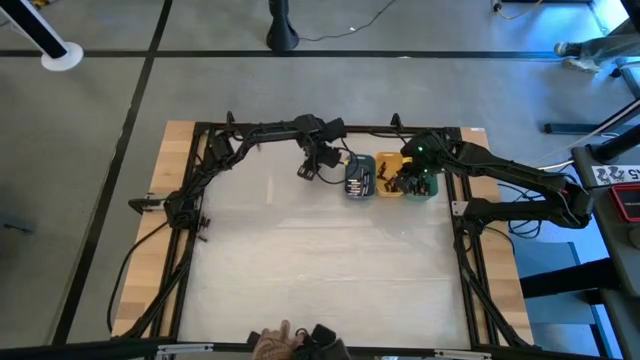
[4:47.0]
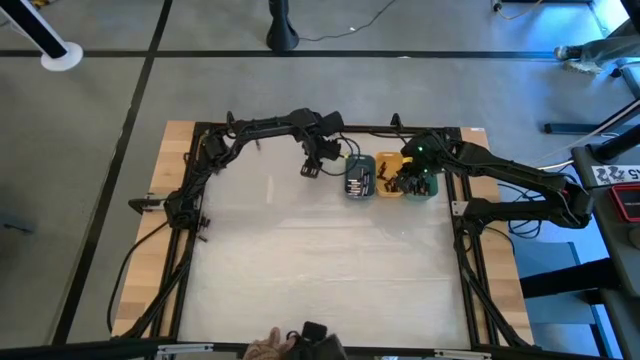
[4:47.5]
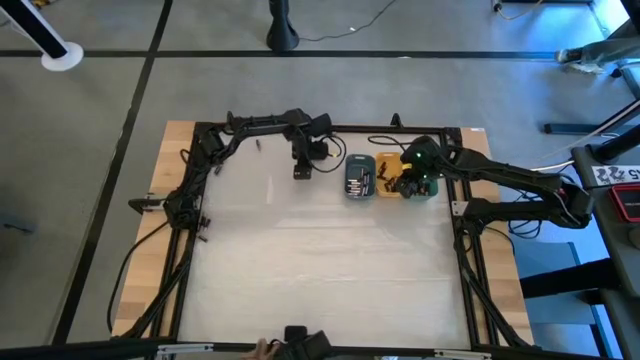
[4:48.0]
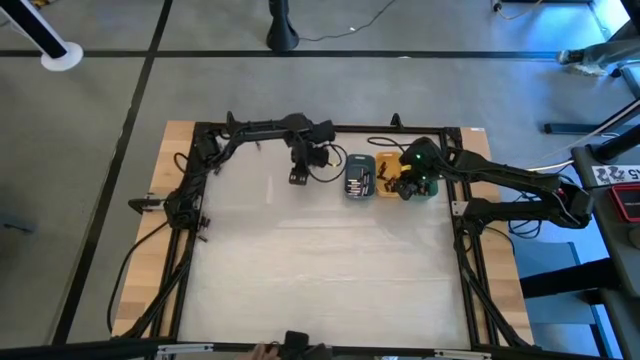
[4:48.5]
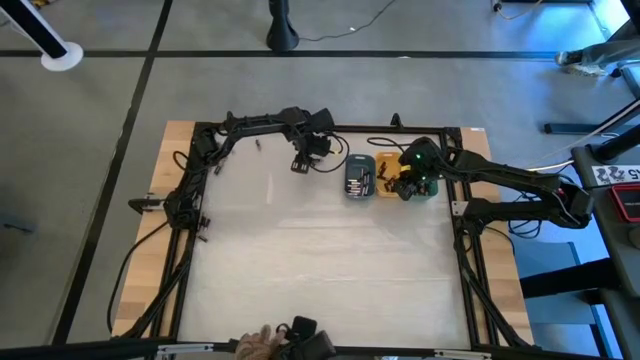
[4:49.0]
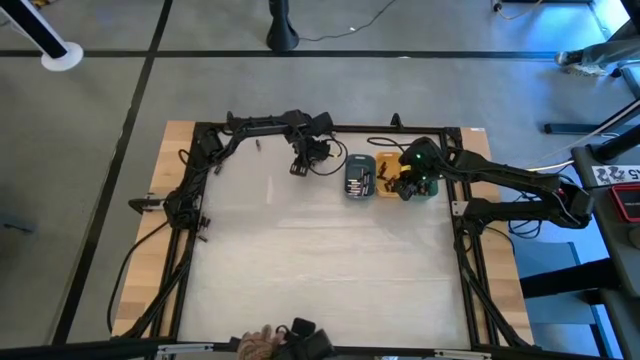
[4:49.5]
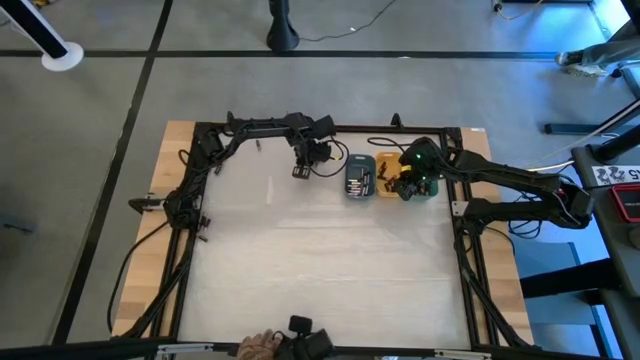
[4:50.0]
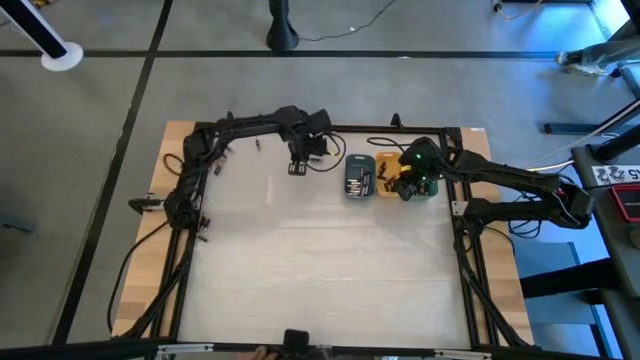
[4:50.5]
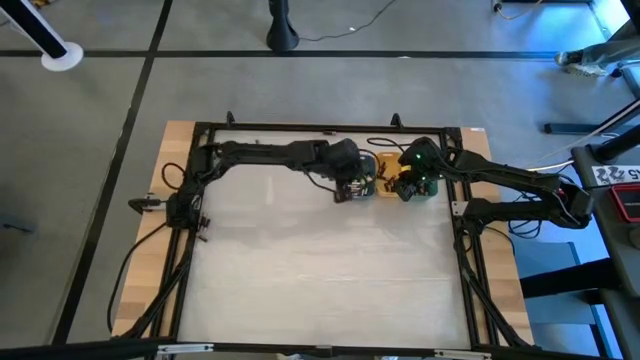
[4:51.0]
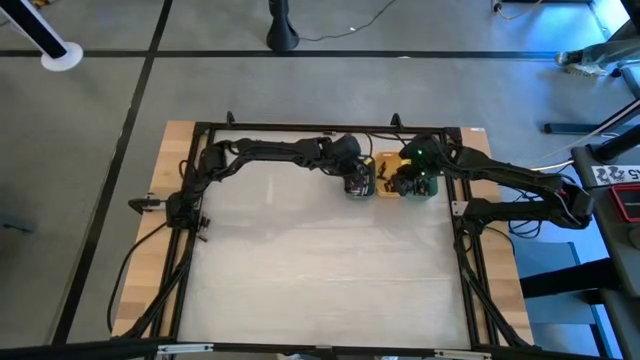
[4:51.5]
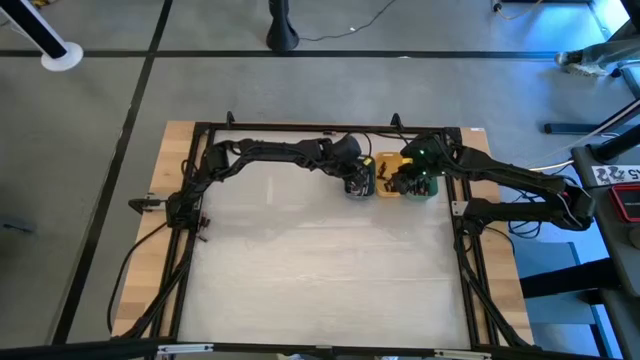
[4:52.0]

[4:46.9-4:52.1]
Task: Sort batteries
Put the silver battery into the blue bin

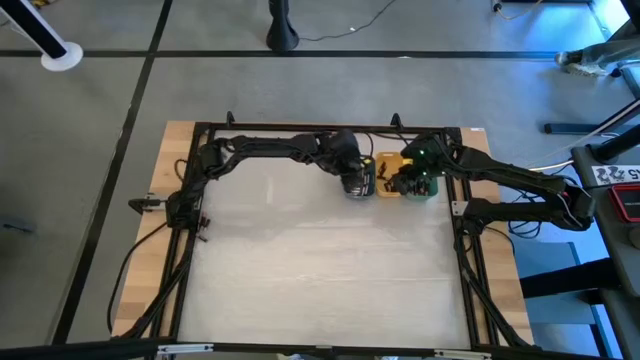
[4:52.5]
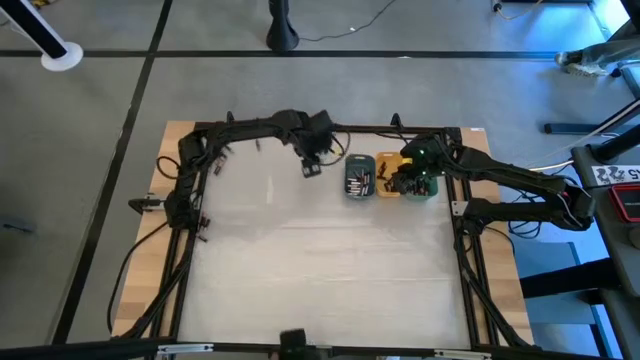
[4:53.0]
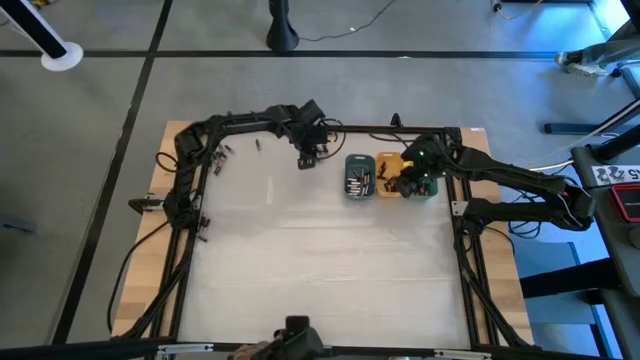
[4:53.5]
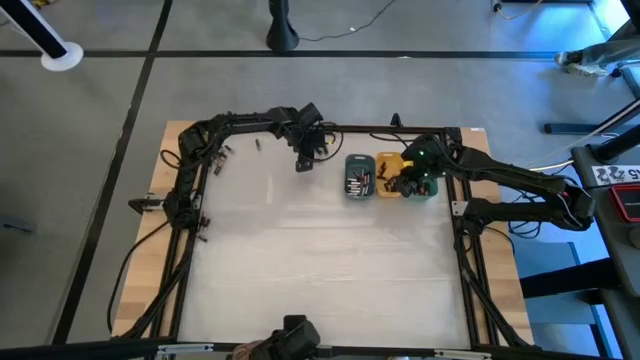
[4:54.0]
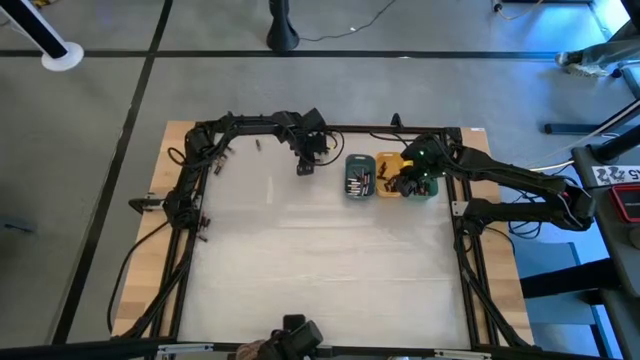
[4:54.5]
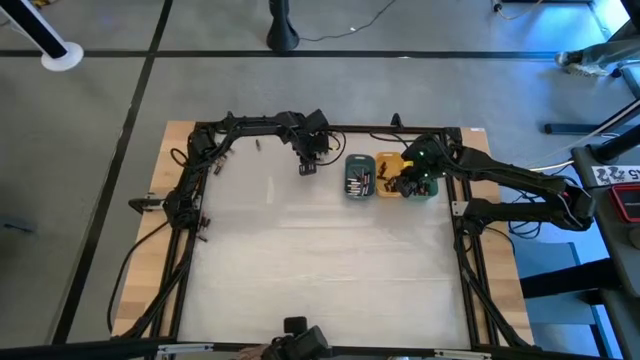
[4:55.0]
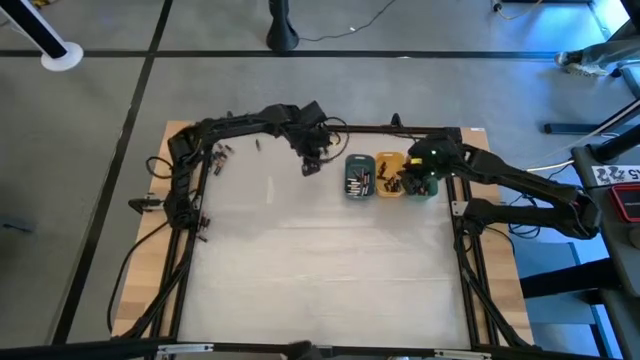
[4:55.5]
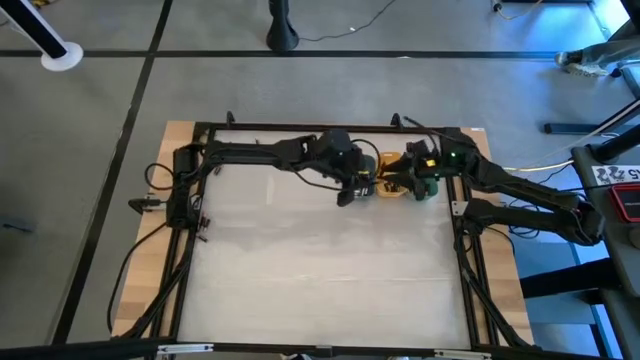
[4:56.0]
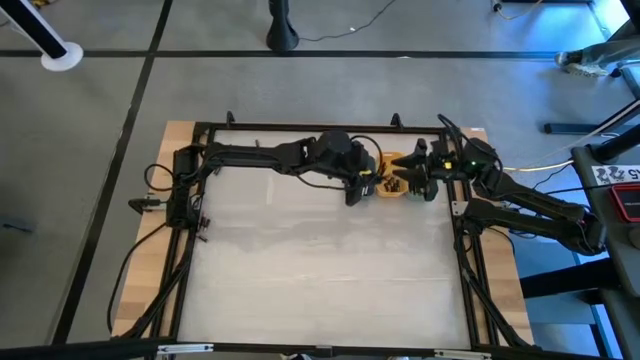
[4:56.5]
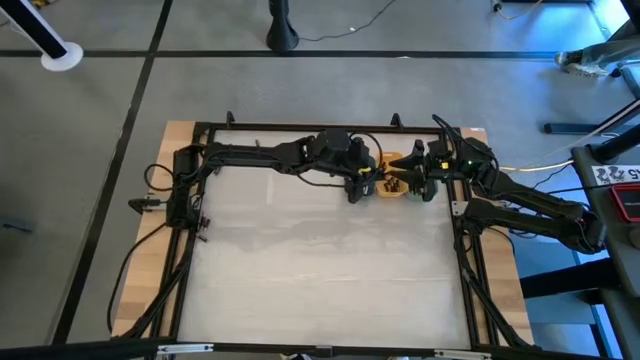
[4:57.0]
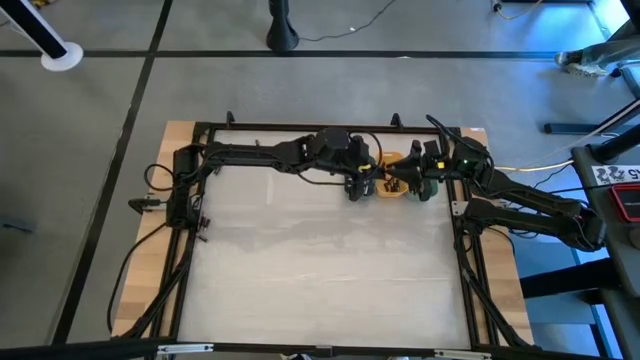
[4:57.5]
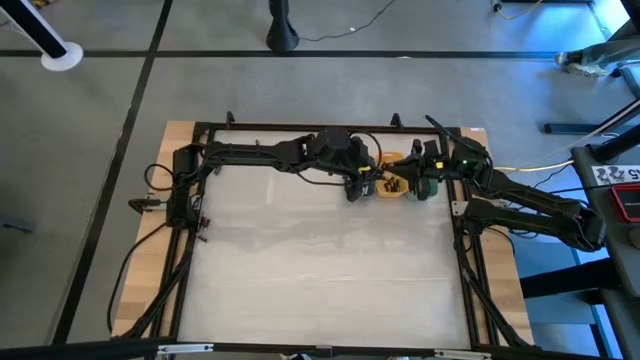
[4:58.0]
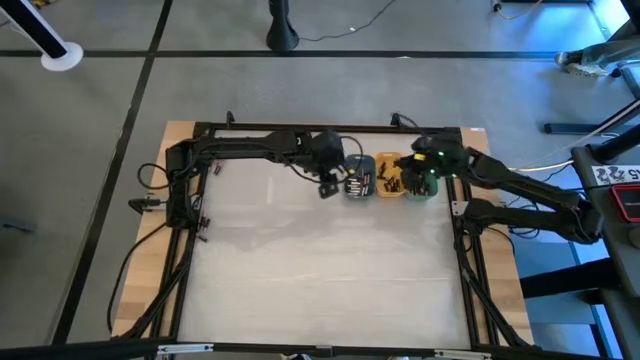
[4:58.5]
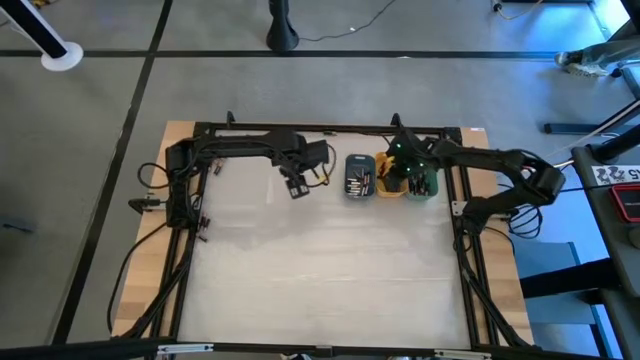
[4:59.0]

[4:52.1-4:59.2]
Put the black battery into the yellow bin

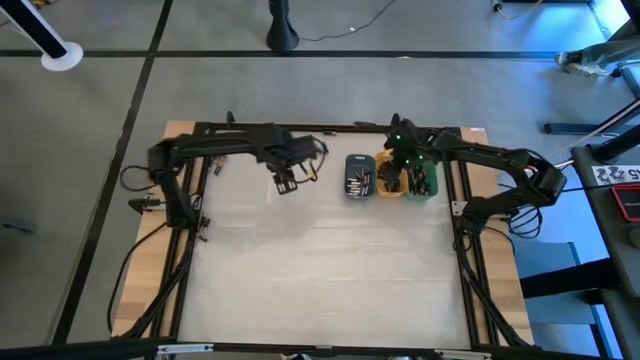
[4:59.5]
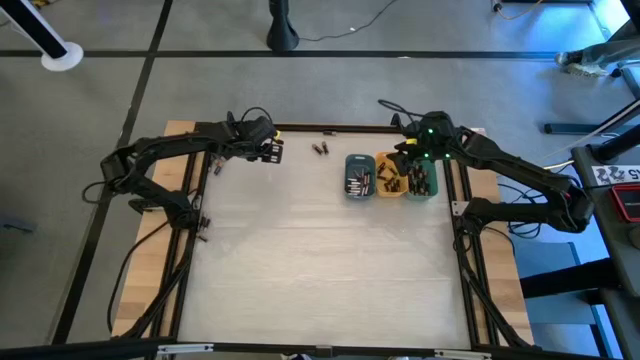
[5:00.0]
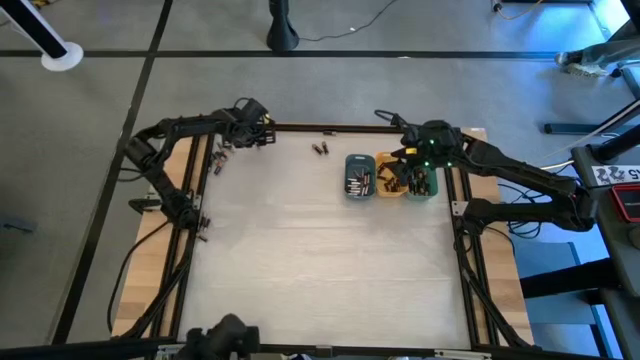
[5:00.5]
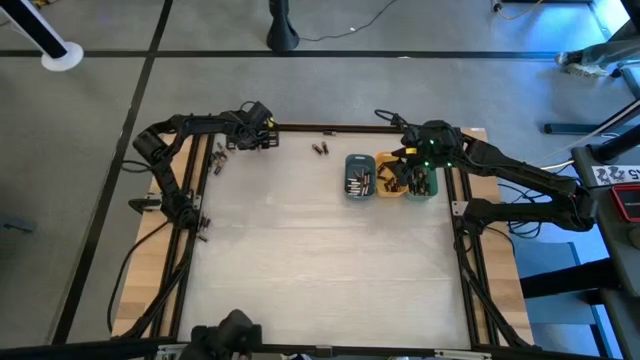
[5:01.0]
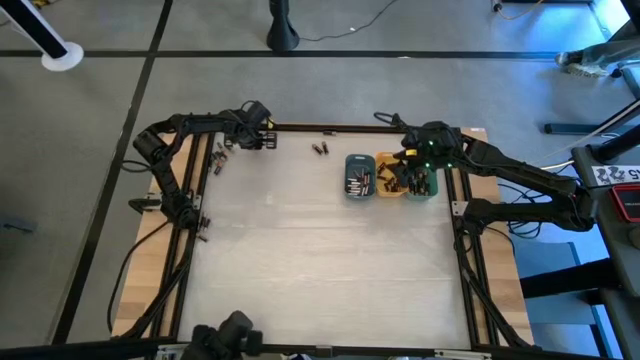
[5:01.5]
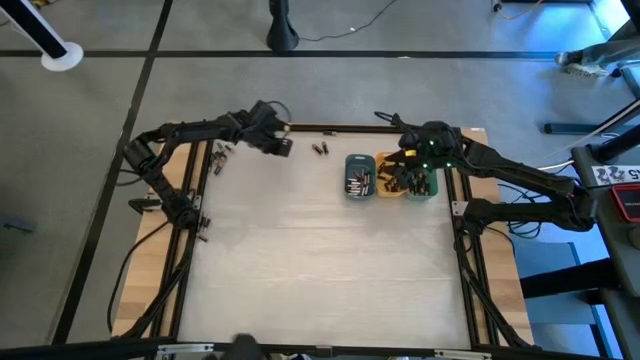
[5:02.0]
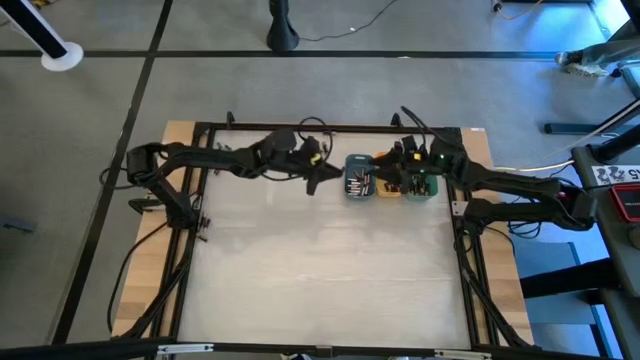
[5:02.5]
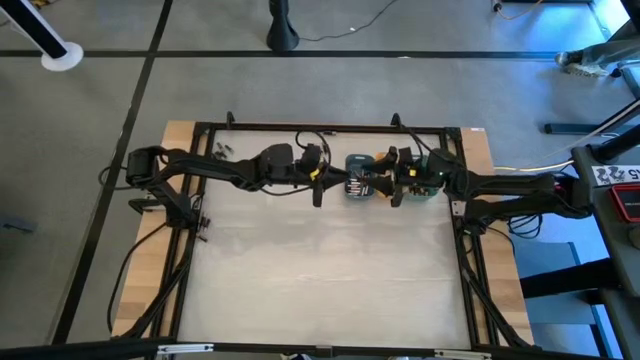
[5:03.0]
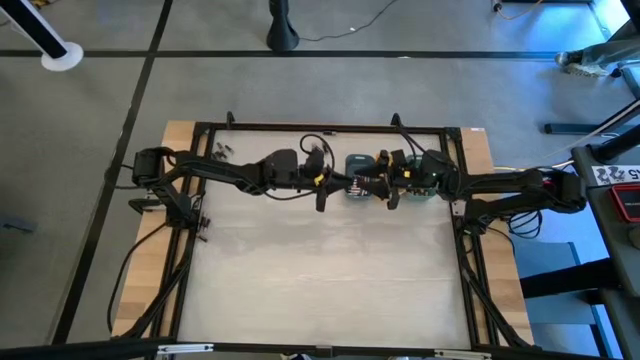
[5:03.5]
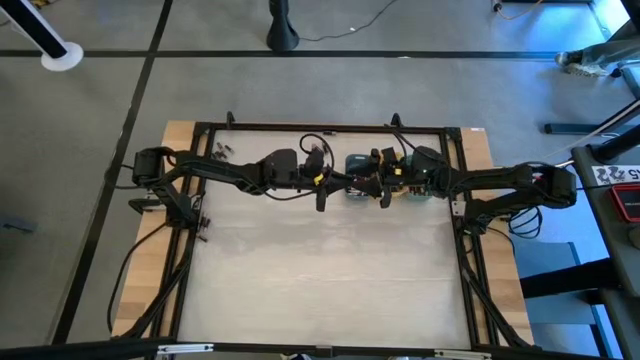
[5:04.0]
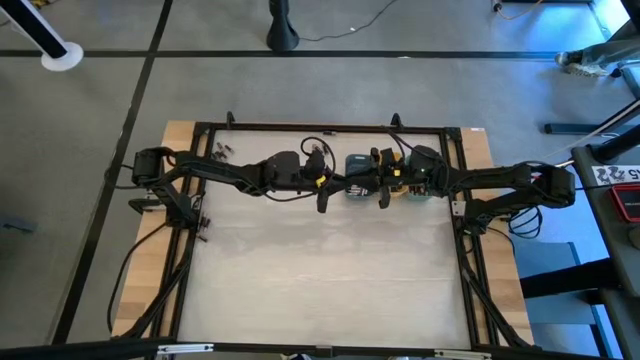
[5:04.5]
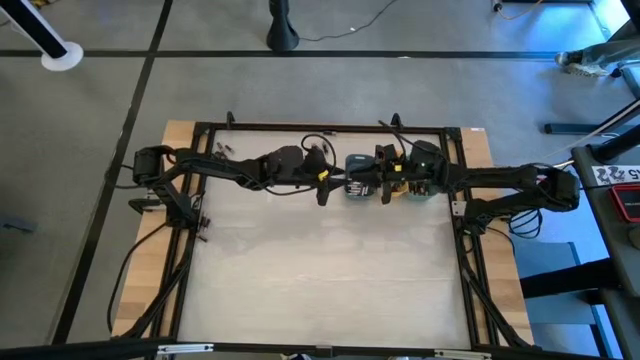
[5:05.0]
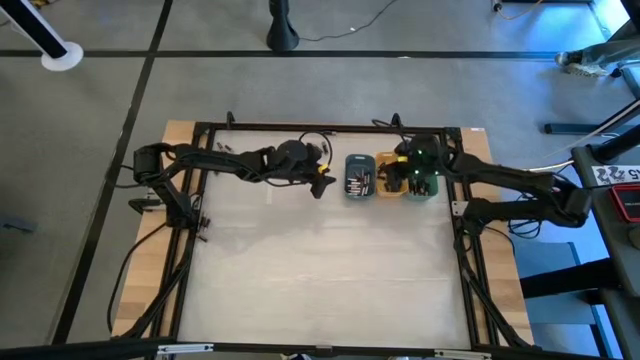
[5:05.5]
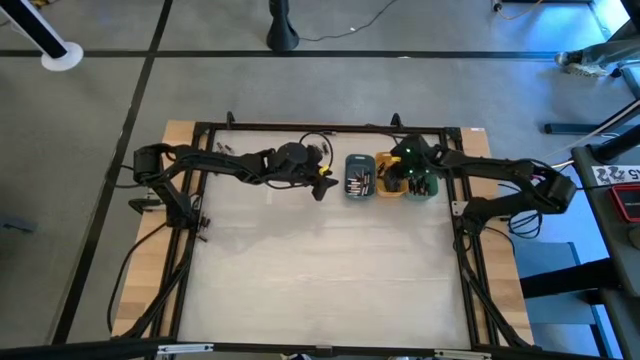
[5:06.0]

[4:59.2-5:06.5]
Put the black battery into the yellow bin

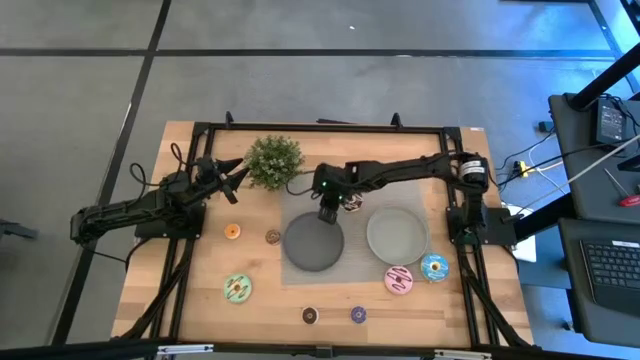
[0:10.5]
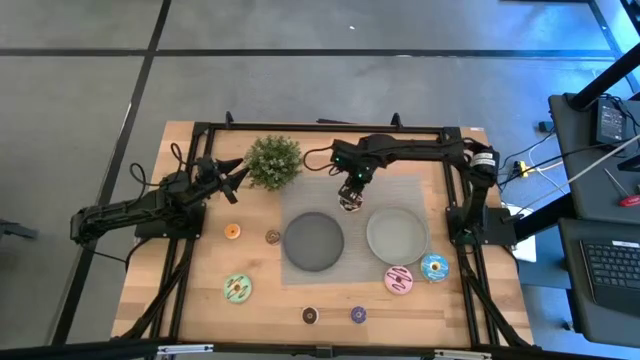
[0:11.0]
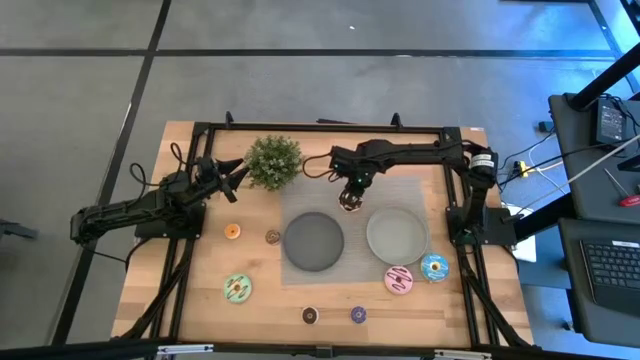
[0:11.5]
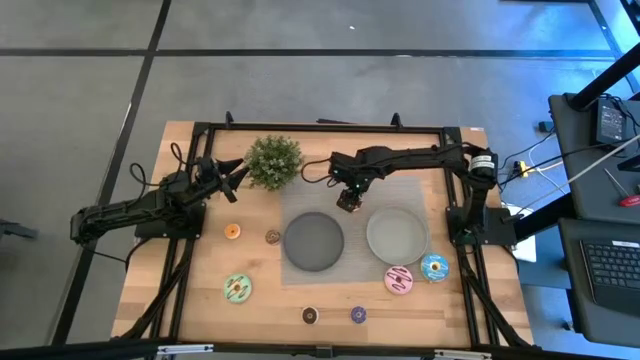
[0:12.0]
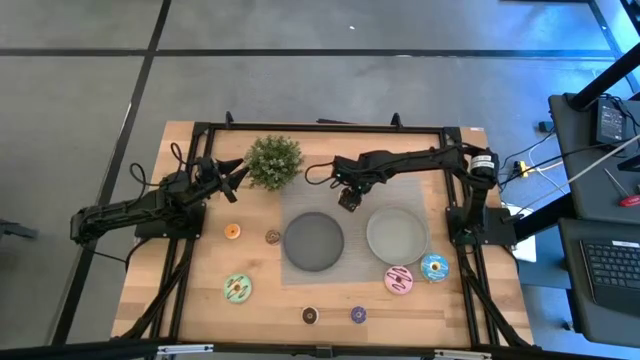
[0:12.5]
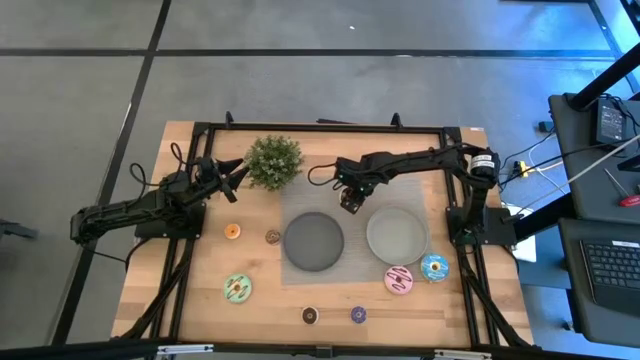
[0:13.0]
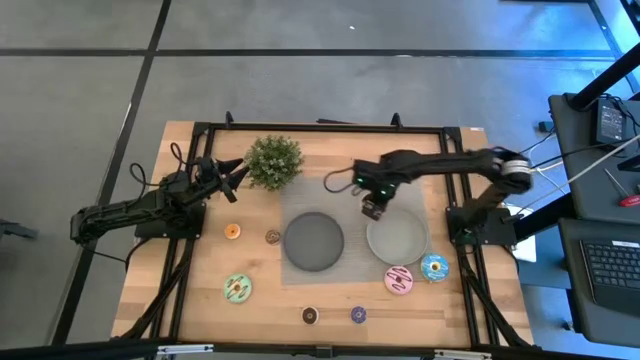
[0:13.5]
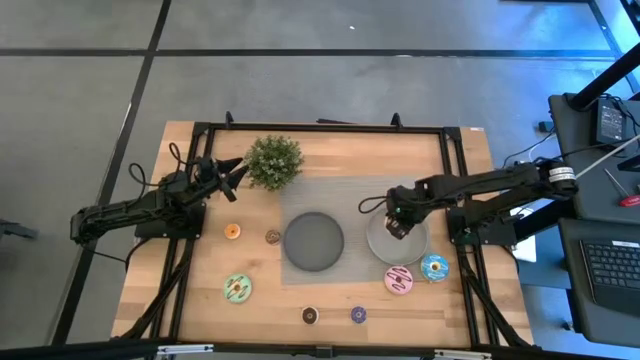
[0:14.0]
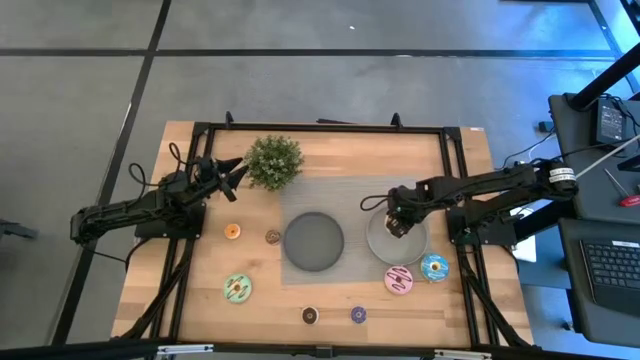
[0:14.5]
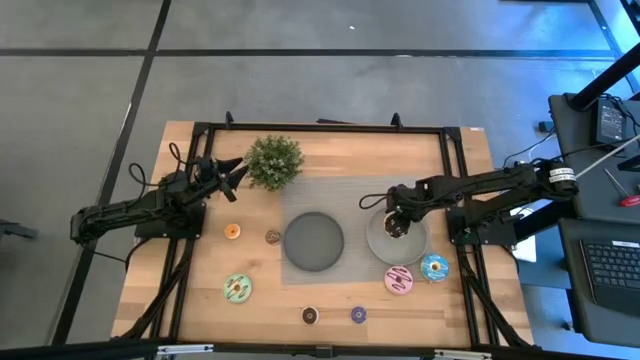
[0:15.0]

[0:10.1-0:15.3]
Task: Pick & Place donuts
Put the large black donut on the light gray plate
